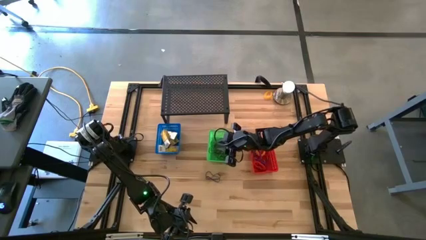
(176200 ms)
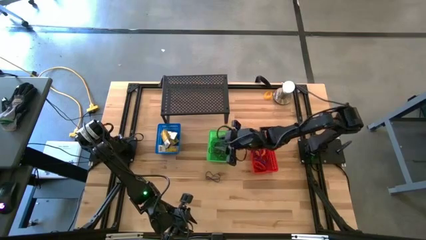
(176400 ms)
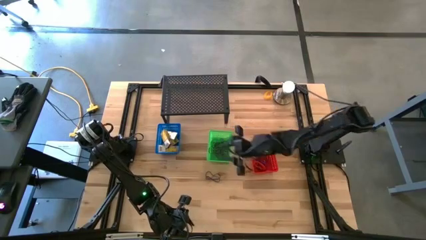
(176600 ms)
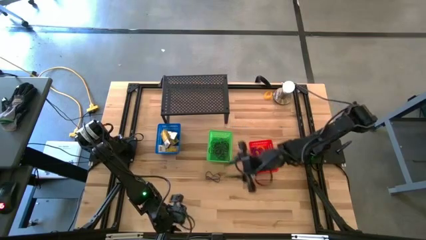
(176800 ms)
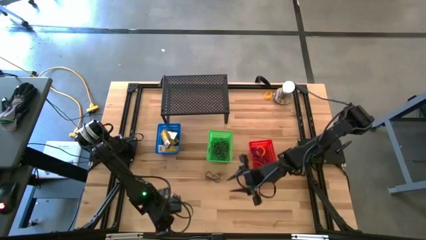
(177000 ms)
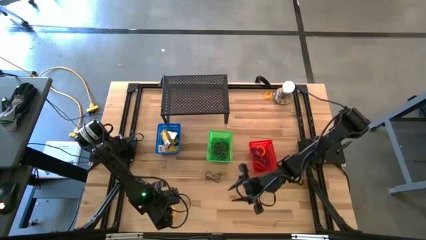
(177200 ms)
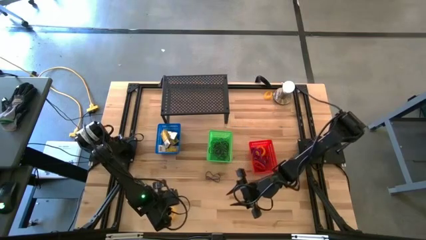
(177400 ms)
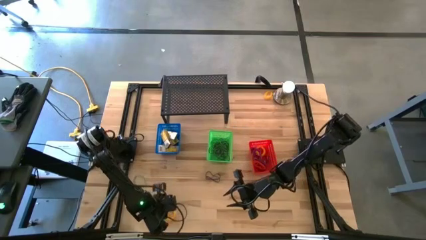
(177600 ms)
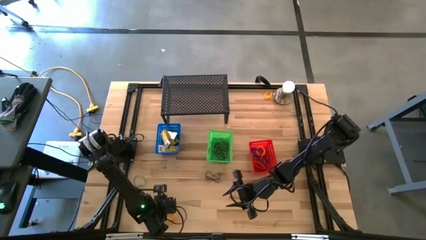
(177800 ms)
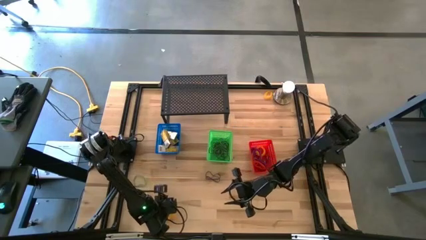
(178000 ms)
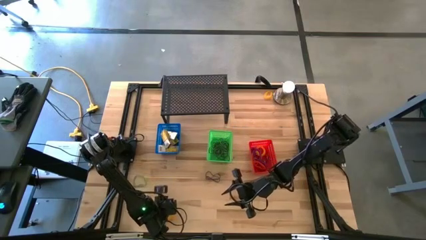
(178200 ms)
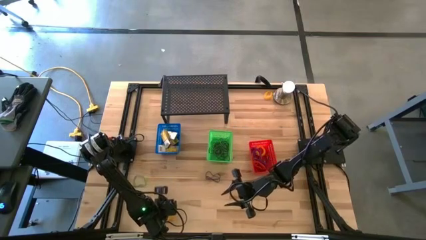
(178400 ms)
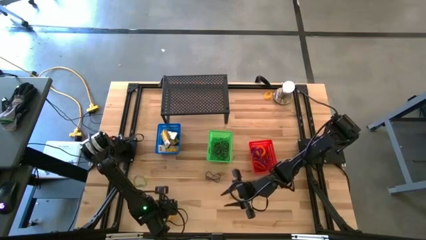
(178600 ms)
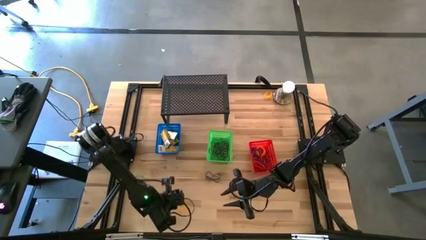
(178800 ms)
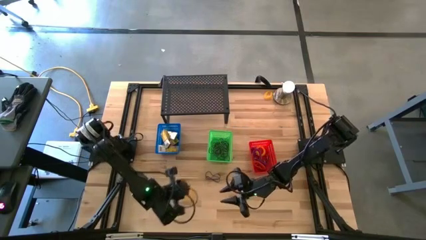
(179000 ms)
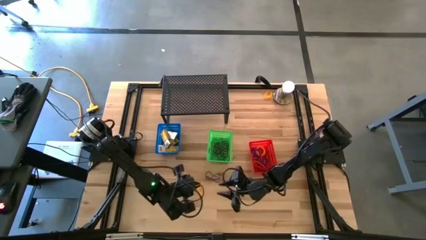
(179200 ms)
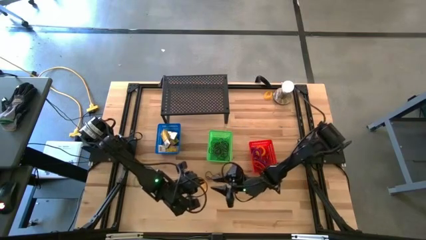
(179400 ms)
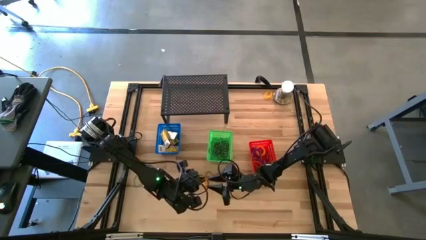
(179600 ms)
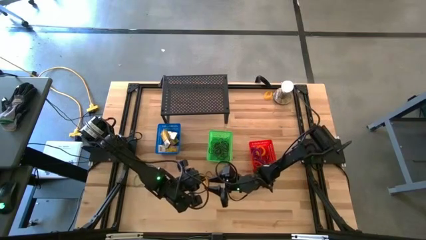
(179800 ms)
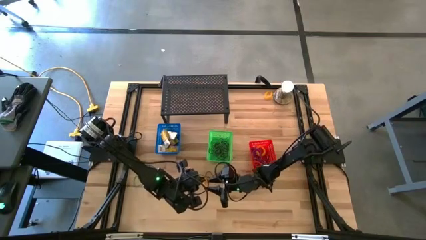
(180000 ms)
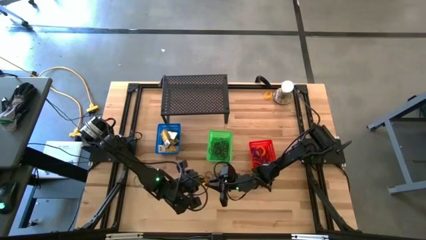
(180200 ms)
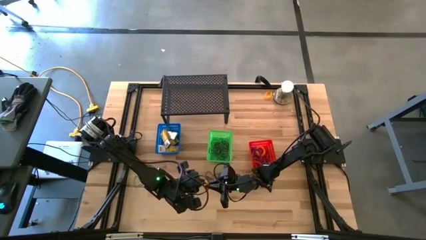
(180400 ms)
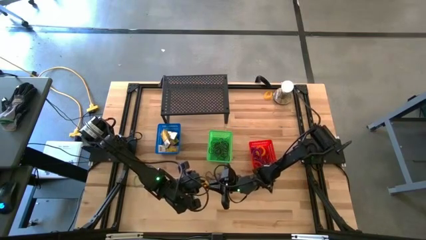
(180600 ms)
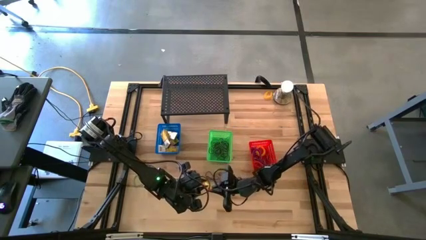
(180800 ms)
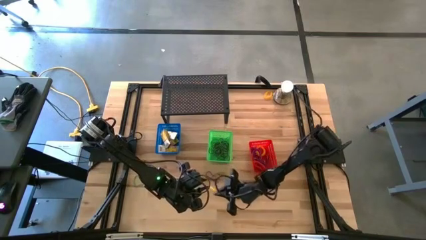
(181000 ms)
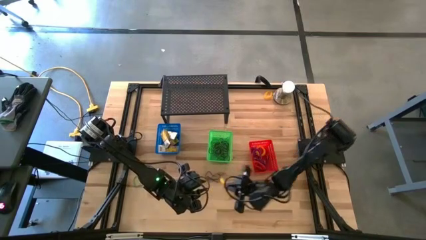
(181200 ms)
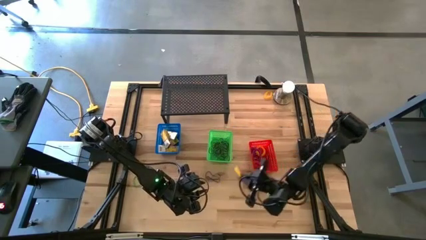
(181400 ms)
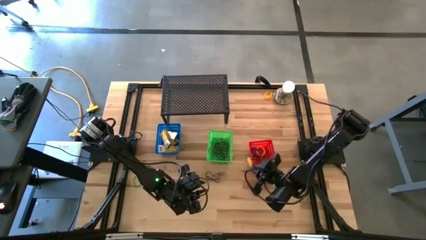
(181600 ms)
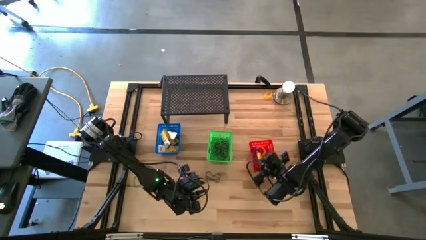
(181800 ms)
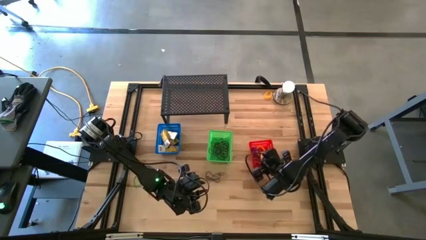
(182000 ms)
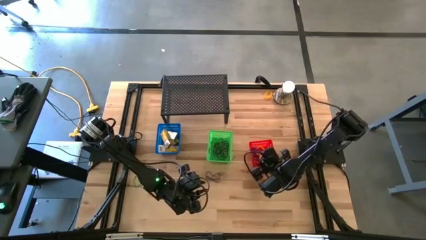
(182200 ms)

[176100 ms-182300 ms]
Task: Pick & Place Office Desk Supplies
Put the yellow spring keychain into the red bin

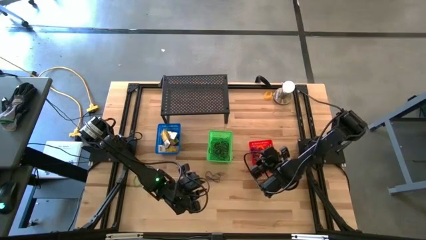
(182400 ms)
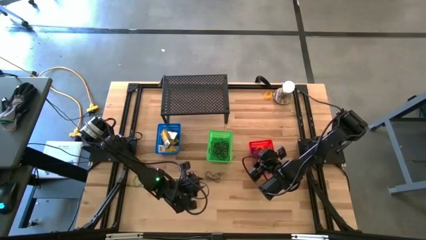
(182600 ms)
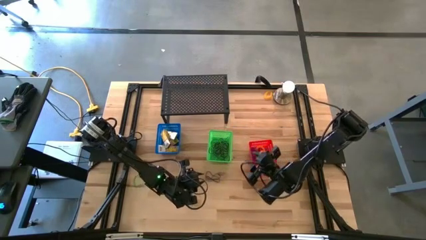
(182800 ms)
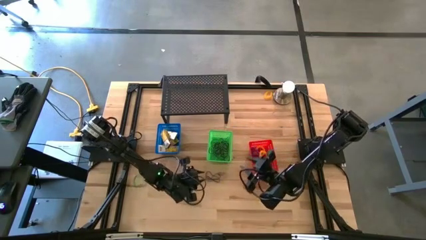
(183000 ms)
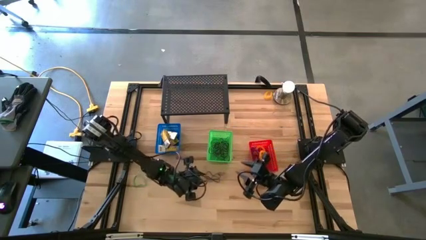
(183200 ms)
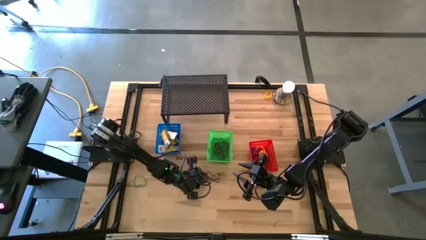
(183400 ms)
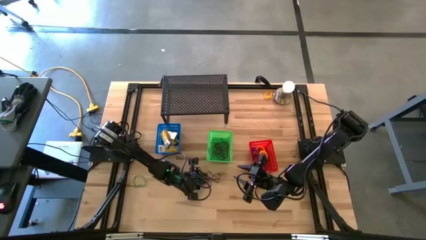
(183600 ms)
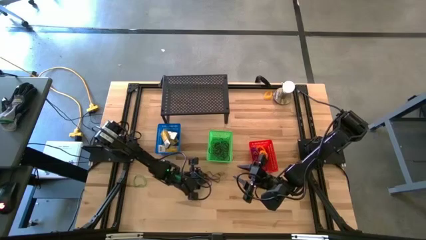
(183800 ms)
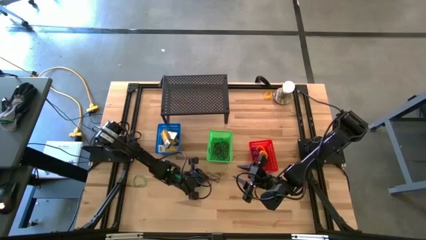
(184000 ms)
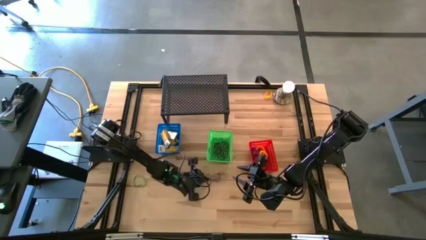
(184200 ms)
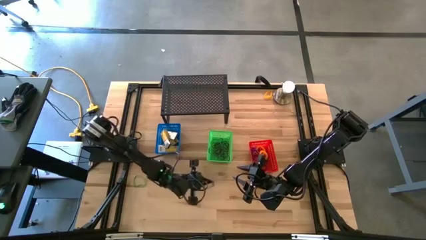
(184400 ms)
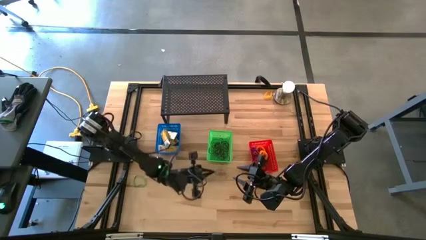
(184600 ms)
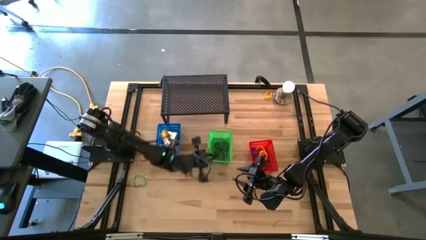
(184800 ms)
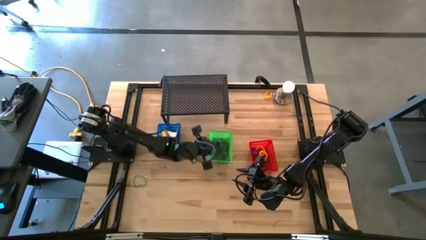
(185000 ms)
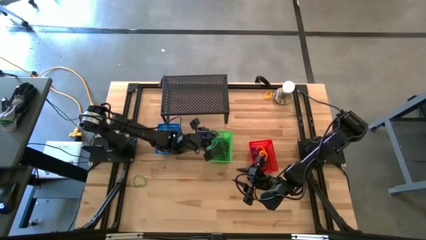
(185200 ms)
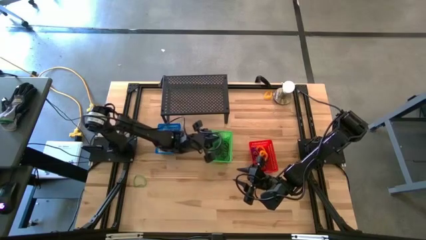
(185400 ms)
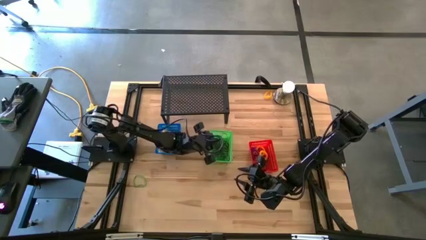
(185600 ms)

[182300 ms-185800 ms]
Put the black rubber band into the green bin

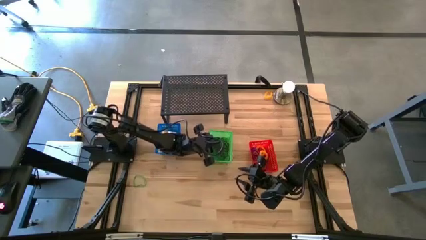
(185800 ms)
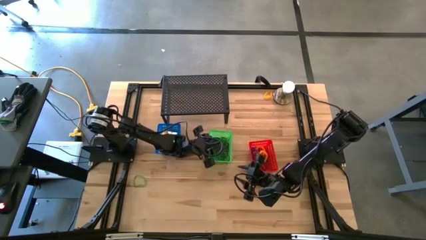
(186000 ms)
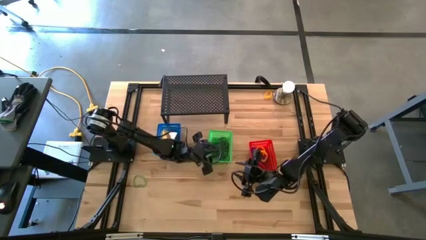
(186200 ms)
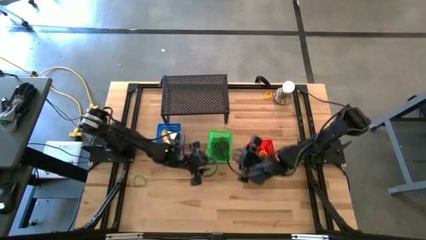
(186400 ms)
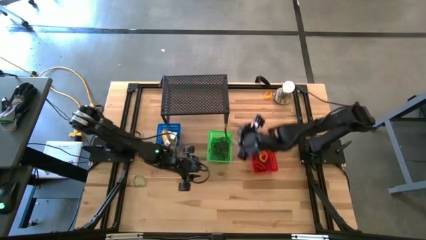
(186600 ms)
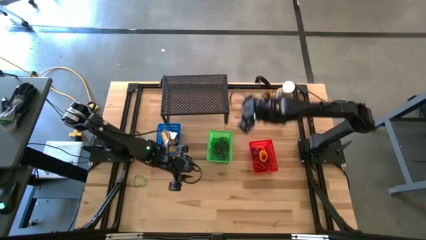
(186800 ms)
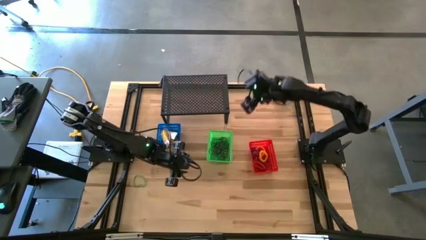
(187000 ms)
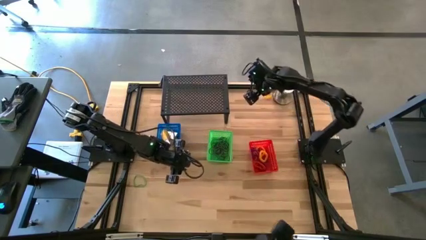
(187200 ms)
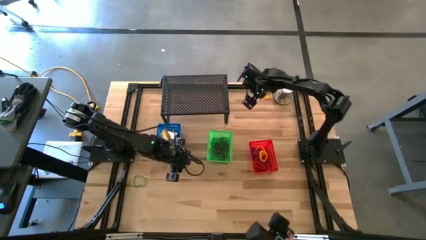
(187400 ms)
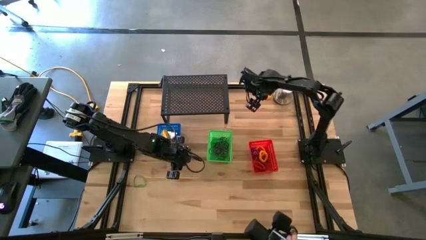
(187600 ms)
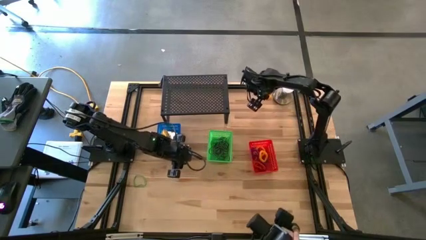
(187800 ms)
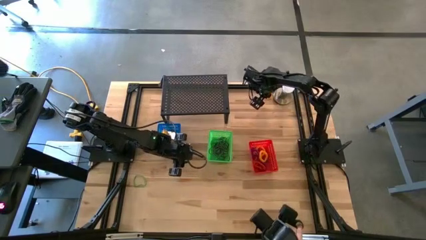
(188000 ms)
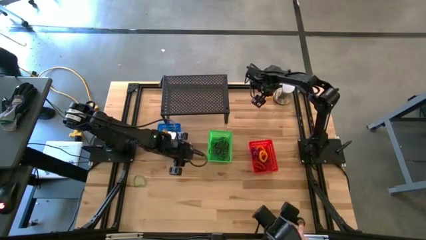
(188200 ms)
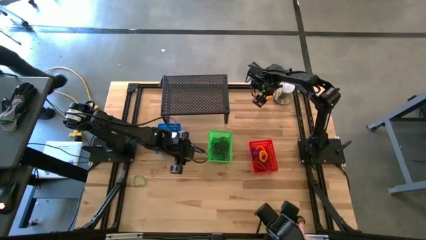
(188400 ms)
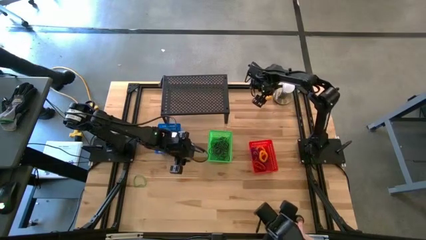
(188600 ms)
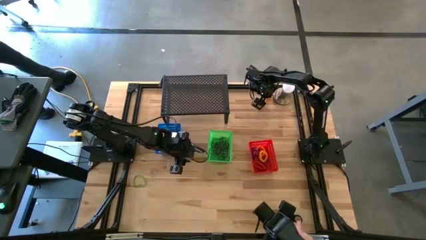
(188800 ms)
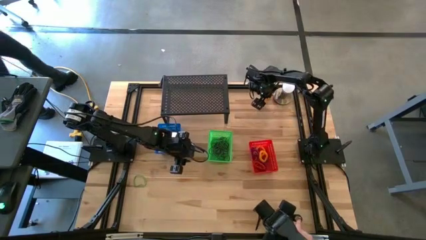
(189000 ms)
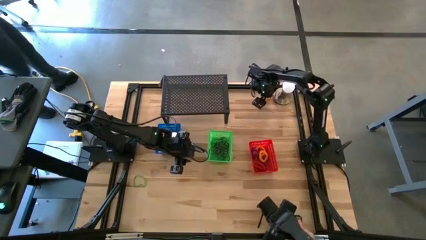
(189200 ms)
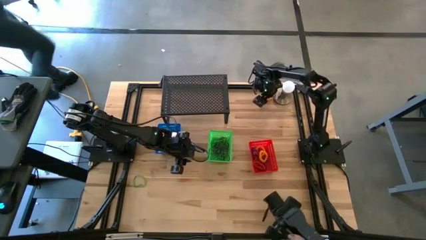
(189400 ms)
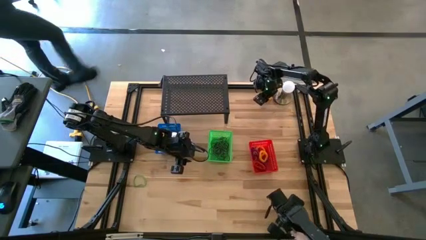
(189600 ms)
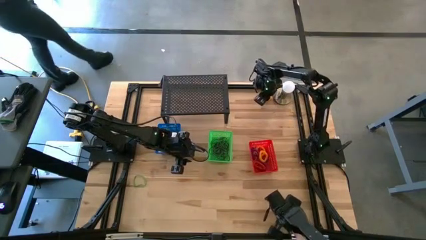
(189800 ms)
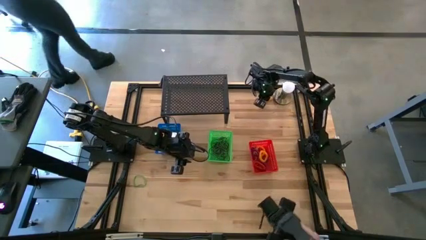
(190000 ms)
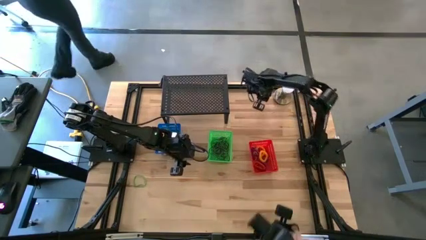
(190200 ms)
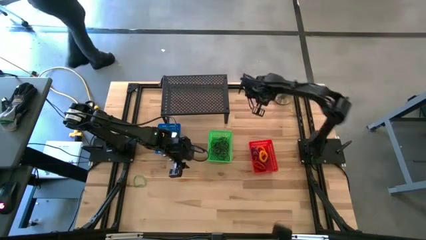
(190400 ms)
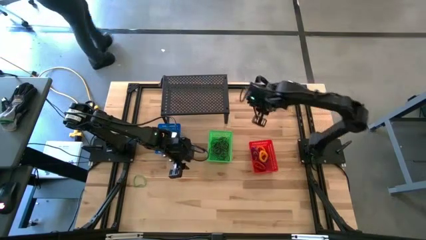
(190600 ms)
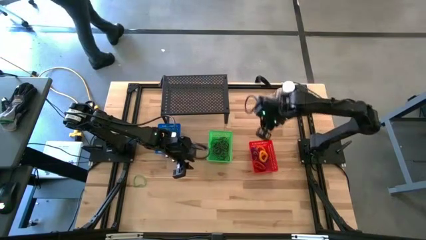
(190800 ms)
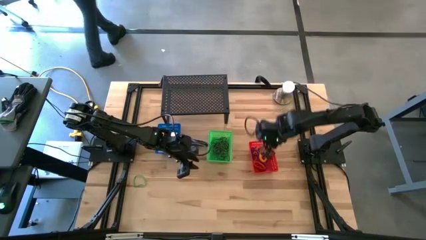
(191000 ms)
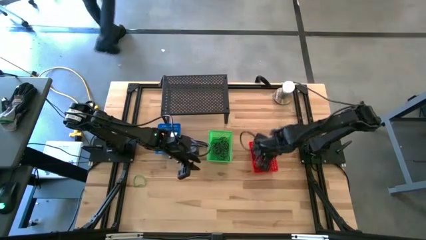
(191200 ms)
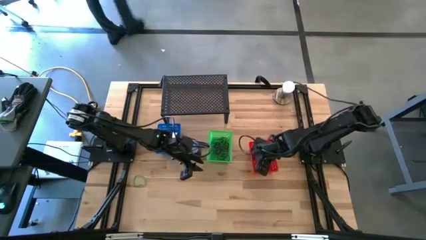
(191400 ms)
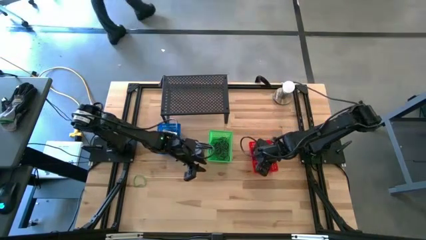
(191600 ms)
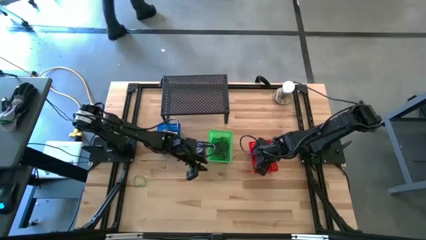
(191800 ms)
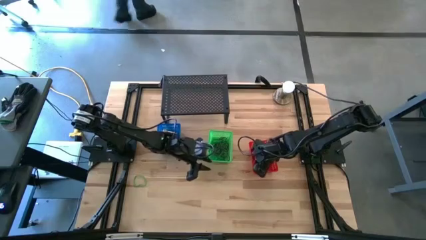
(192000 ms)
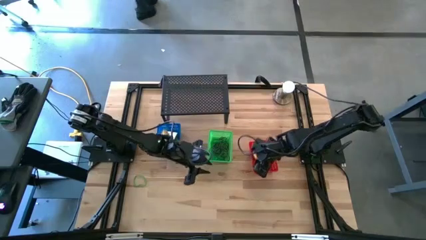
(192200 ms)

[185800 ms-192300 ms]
Put the yellow spring keychain into the red bin
